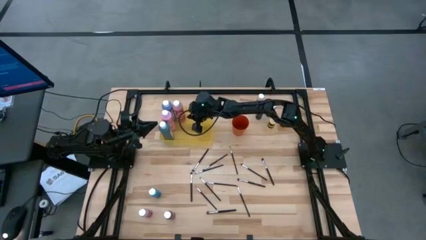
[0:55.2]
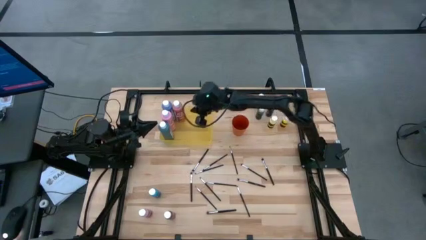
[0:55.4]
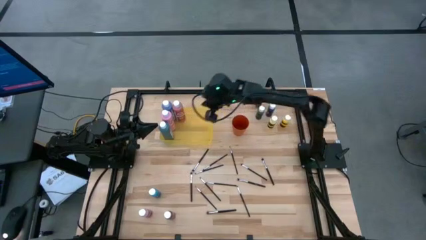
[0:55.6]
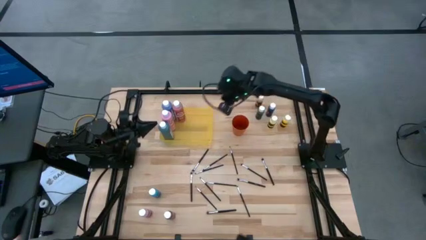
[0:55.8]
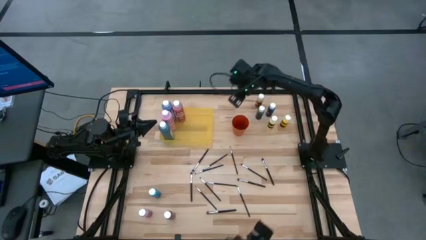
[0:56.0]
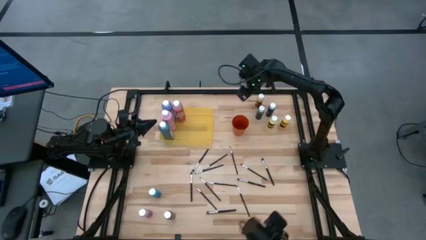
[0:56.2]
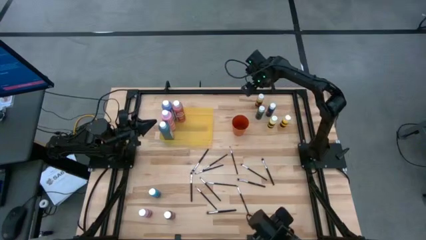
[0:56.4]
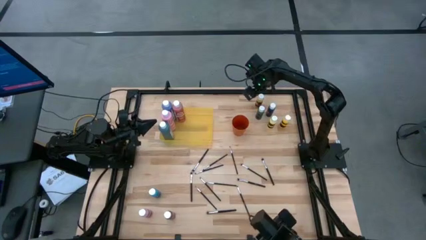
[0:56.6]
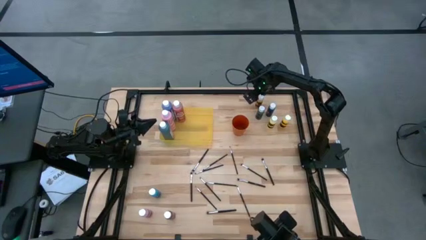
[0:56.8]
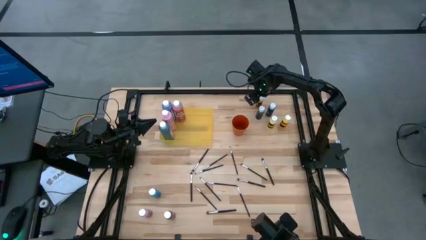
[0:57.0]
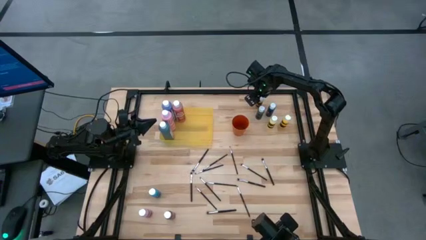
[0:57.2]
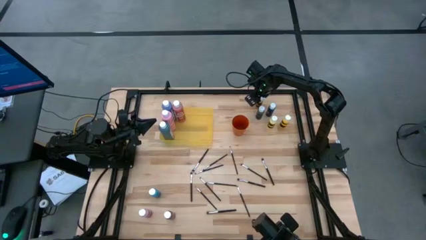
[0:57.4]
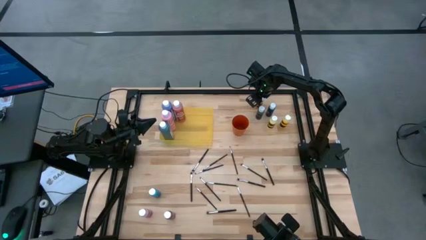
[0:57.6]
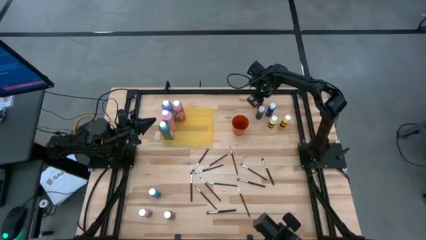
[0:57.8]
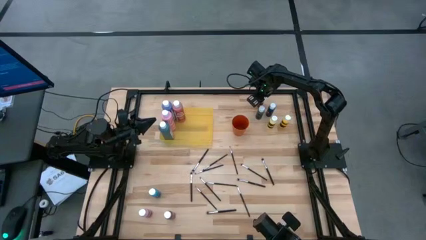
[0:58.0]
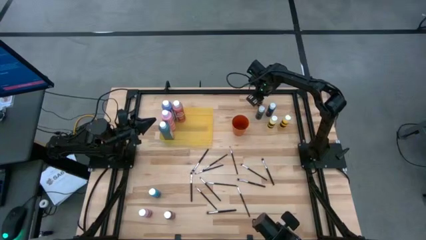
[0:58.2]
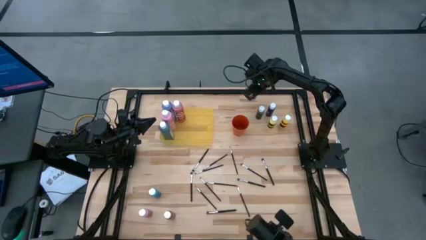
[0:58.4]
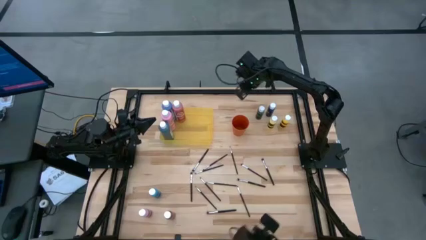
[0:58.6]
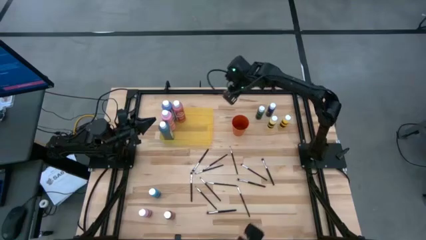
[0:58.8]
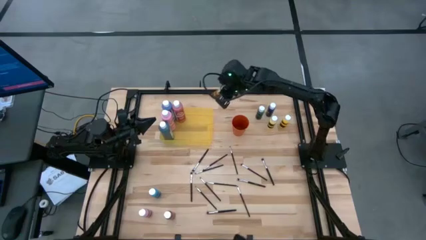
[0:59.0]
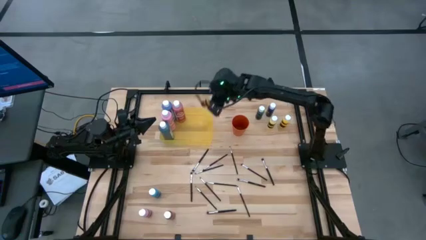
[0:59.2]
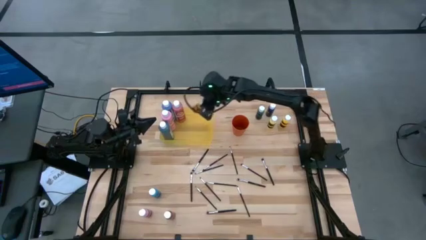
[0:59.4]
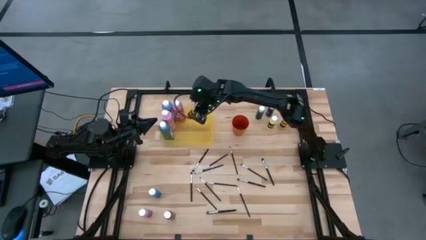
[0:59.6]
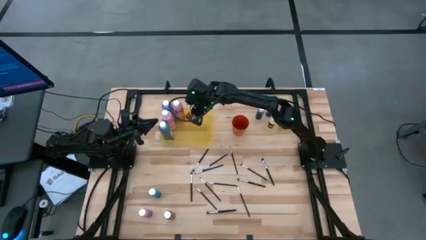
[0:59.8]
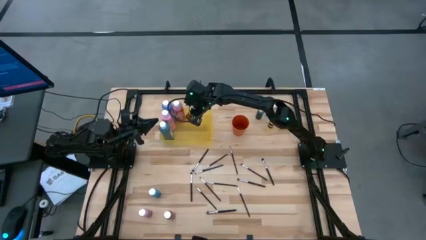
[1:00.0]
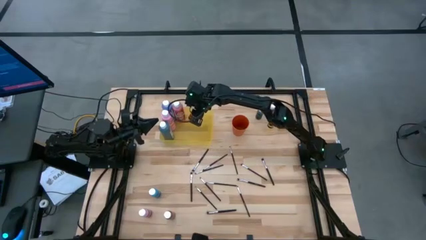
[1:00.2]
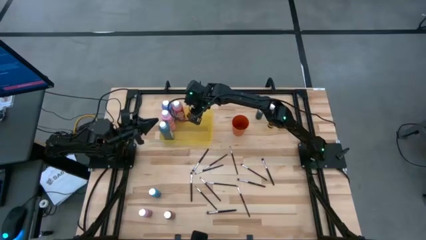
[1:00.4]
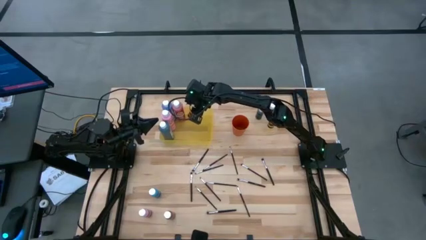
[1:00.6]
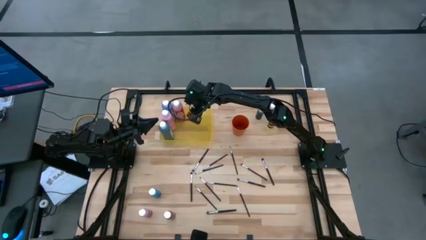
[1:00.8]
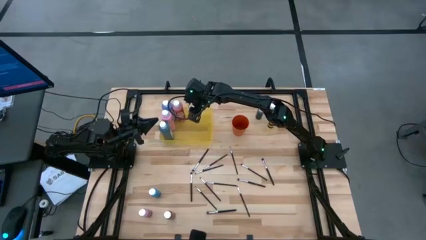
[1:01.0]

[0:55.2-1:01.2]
Task: Pick & Place Paint Supplies
Put the yellow paint bottle into the yellow bin
